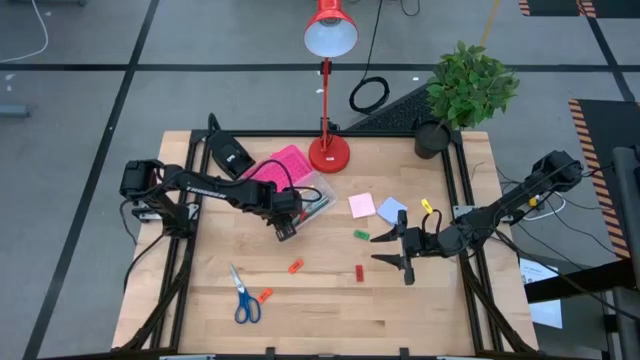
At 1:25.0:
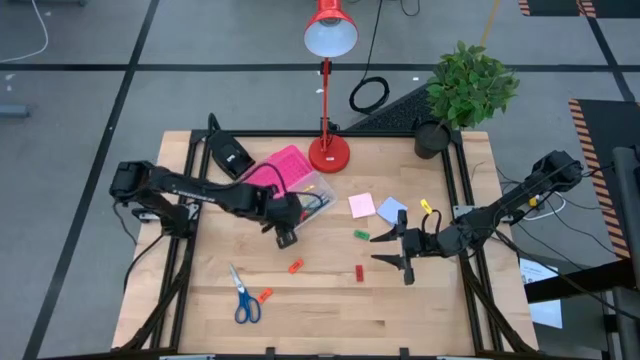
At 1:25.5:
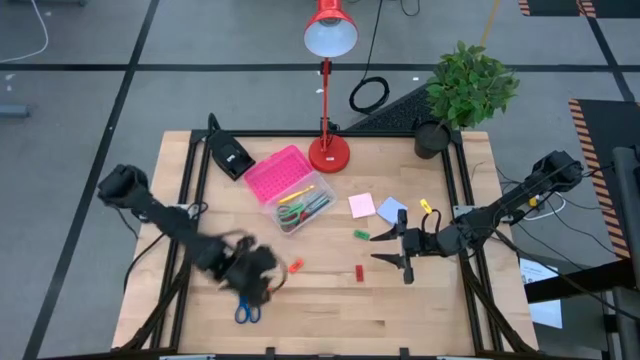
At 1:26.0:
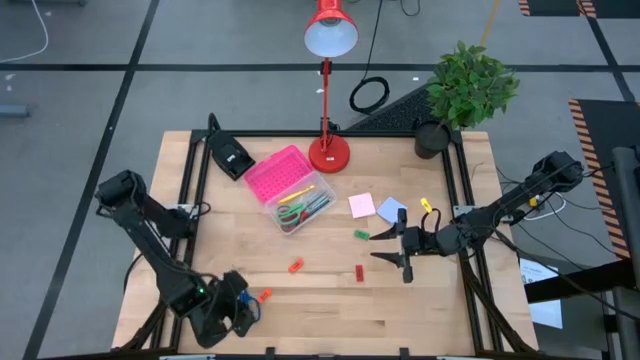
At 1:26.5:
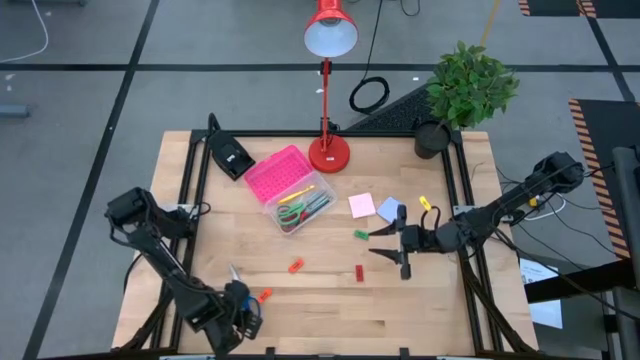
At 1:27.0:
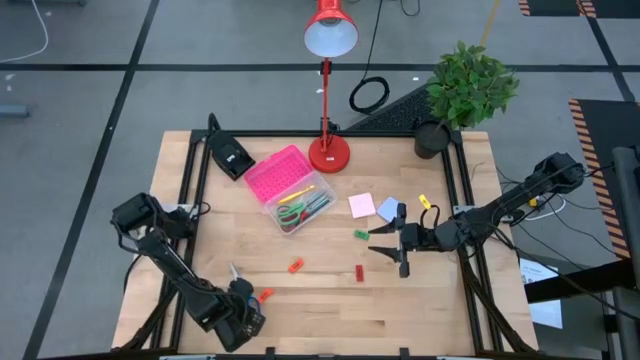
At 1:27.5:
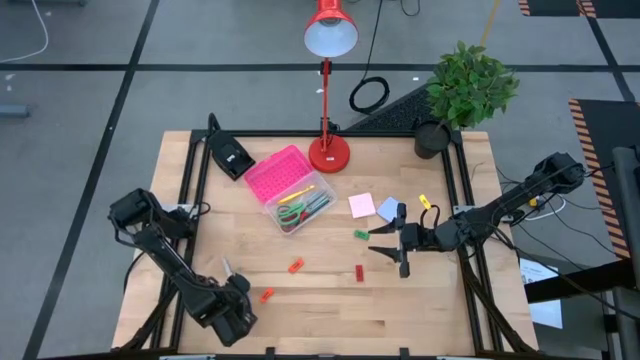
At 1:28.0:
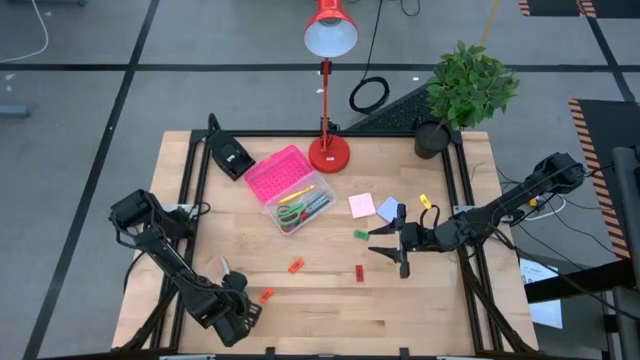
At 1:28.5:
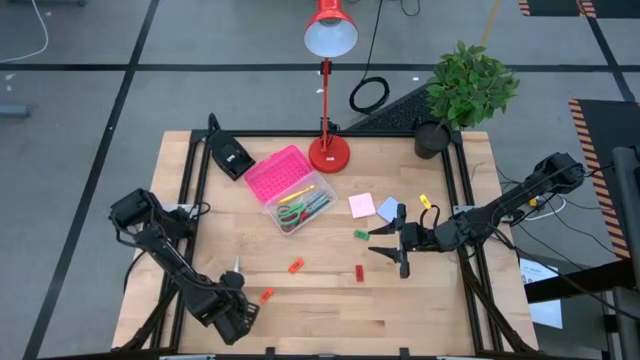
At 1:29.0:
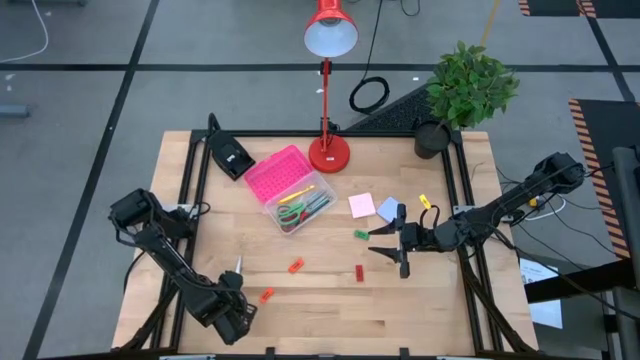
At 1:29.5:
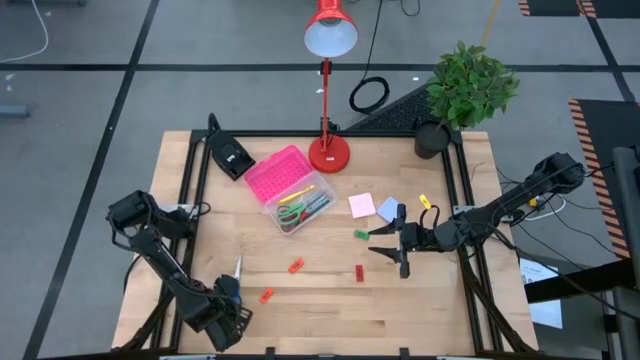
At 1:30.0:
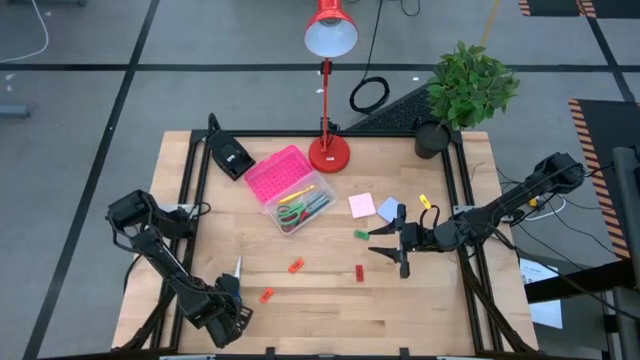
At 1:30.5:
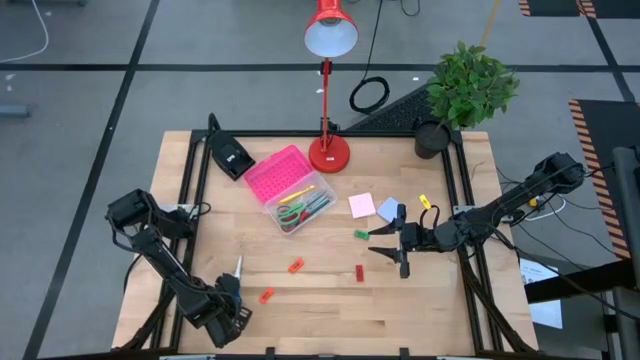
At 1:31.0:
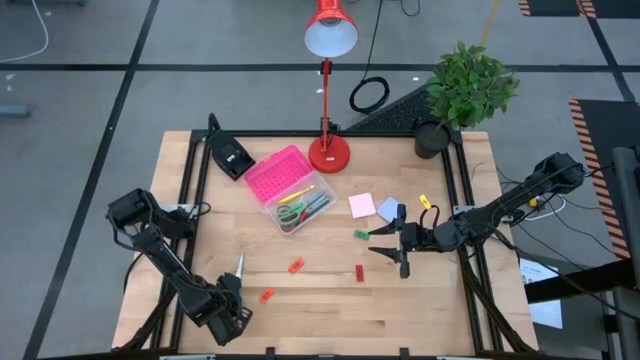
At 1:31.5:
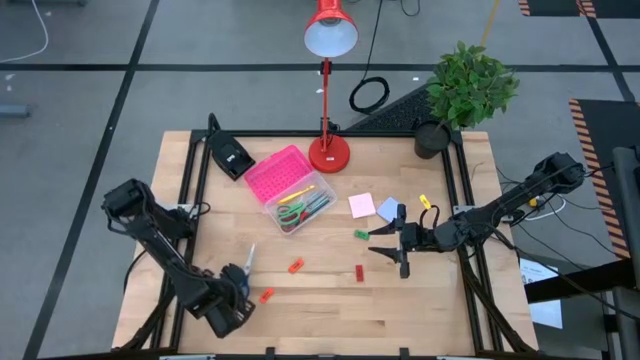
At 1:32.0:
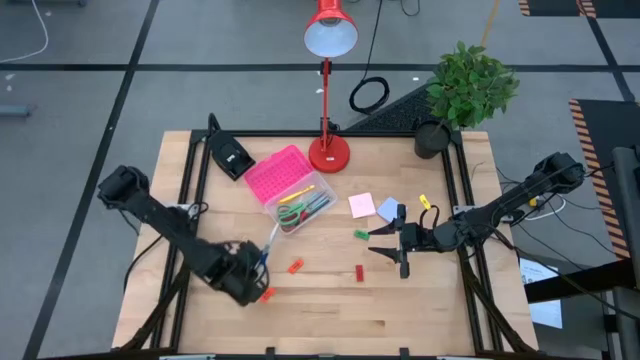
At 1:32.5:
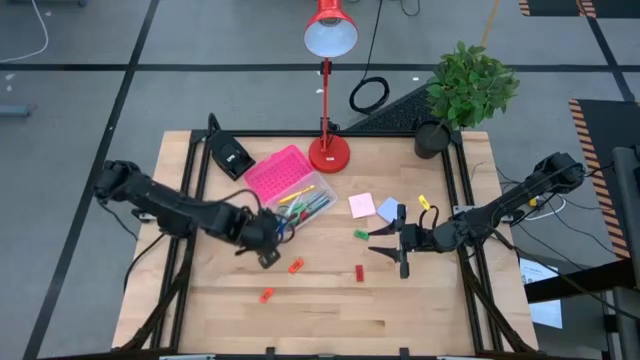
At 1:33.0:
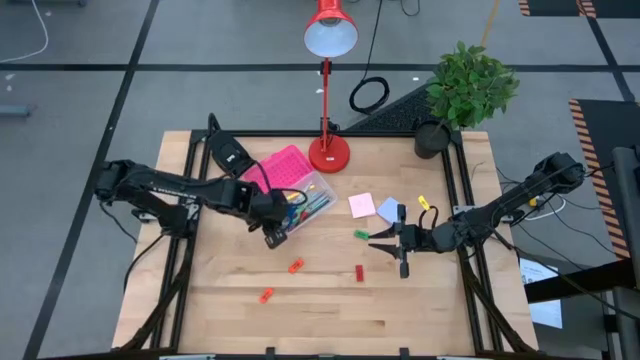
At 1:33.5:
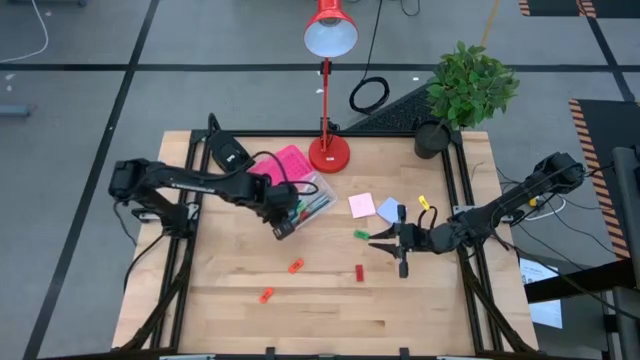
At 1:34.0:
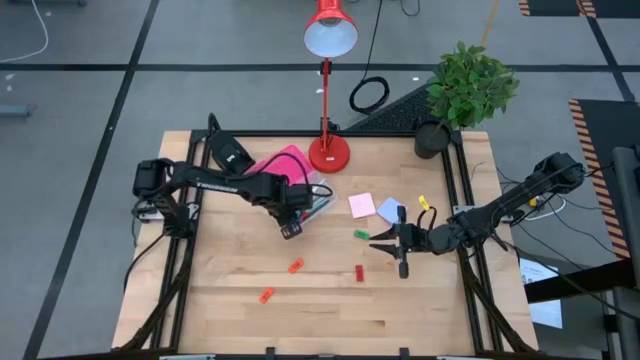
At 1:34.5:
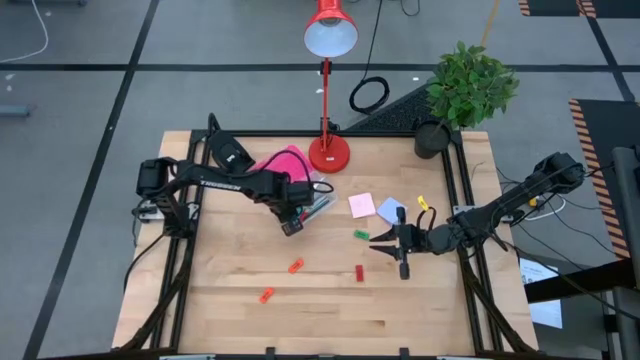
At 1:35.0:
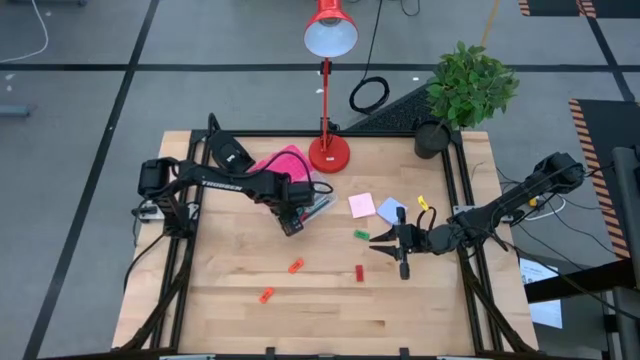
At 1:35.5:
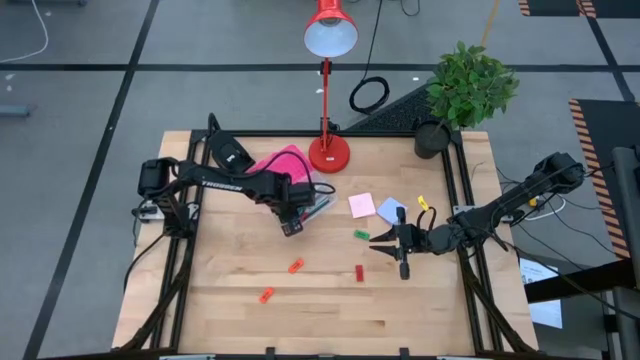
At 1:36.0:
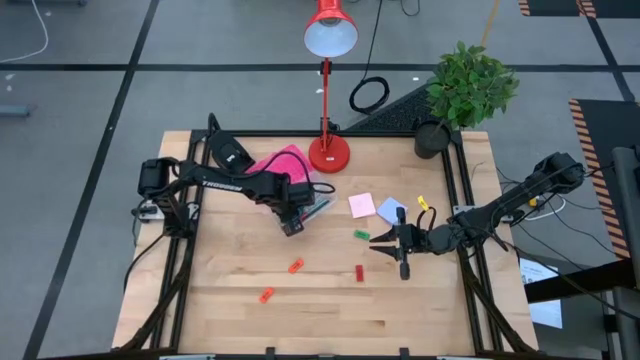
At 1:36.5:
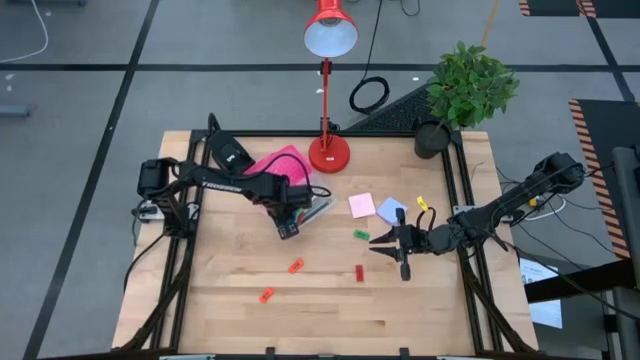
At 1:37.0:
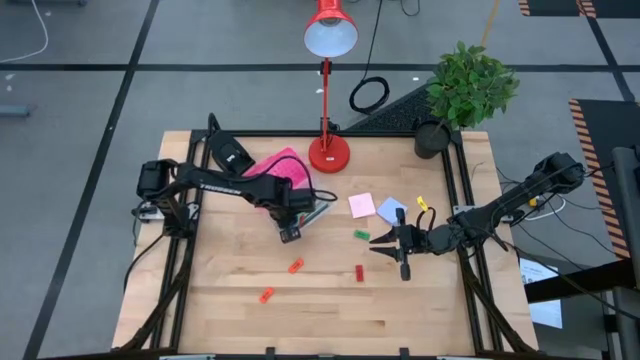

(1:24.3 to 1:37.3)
Task: Pack school essentials
Put the blue scissors into the pink supply box

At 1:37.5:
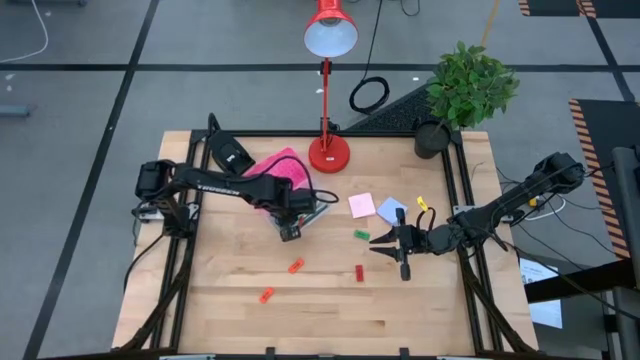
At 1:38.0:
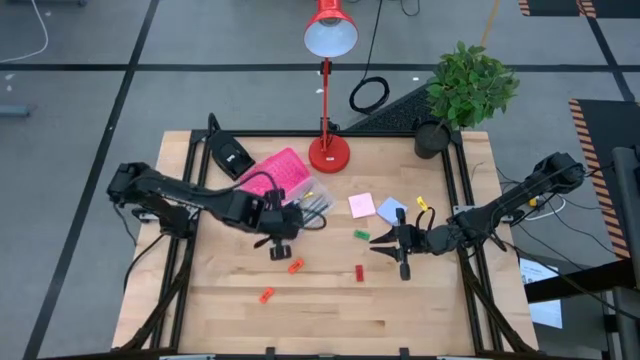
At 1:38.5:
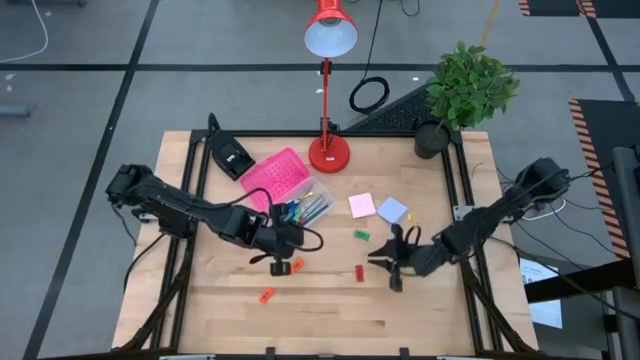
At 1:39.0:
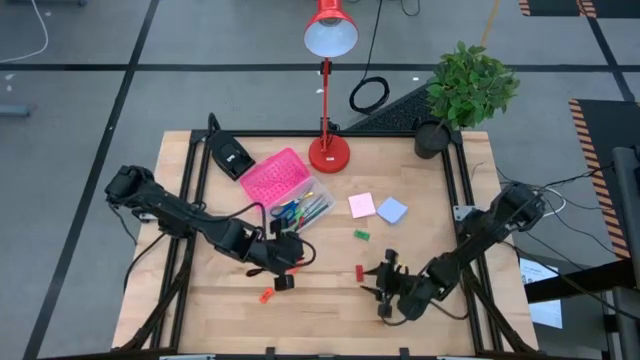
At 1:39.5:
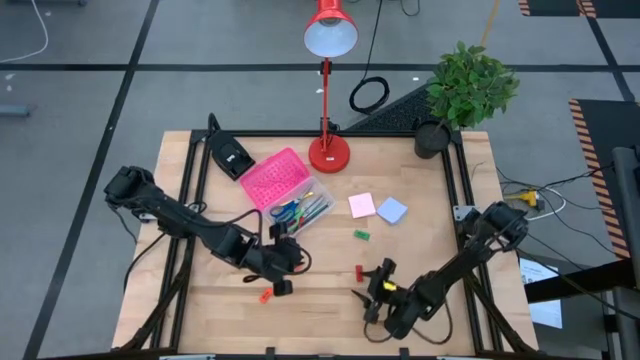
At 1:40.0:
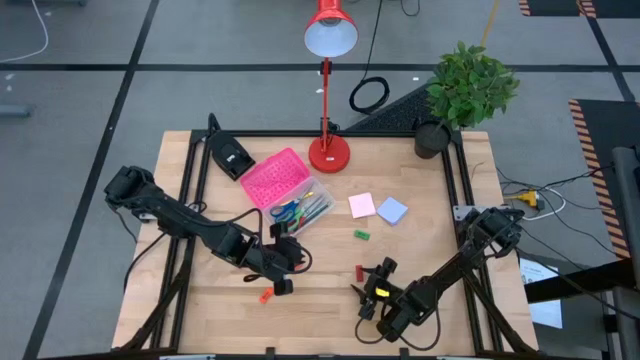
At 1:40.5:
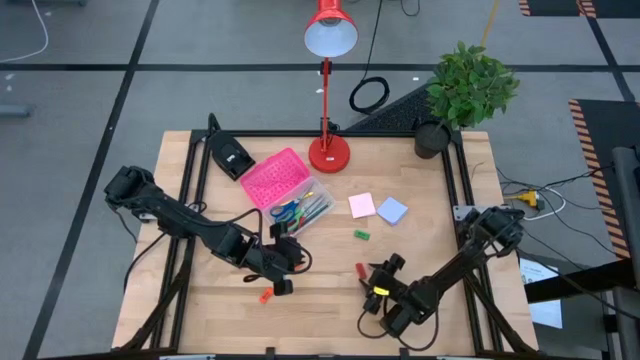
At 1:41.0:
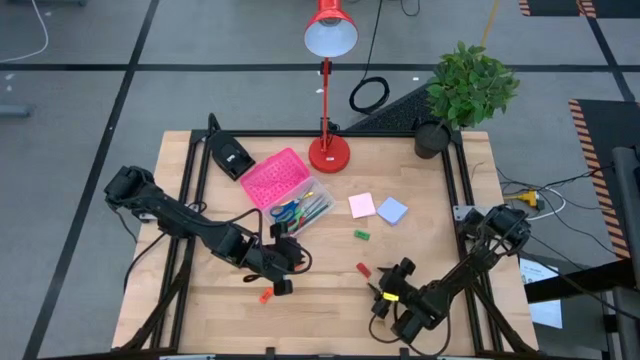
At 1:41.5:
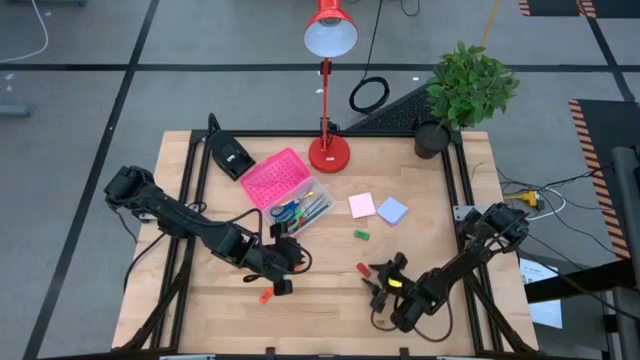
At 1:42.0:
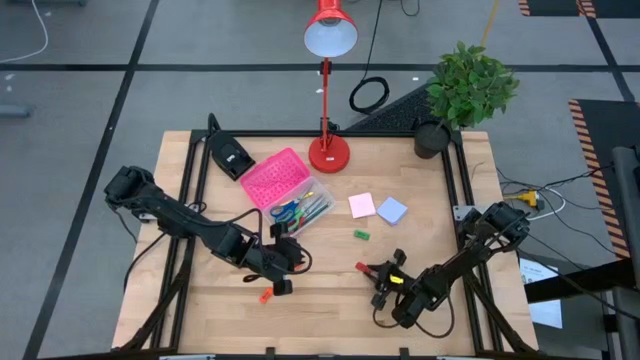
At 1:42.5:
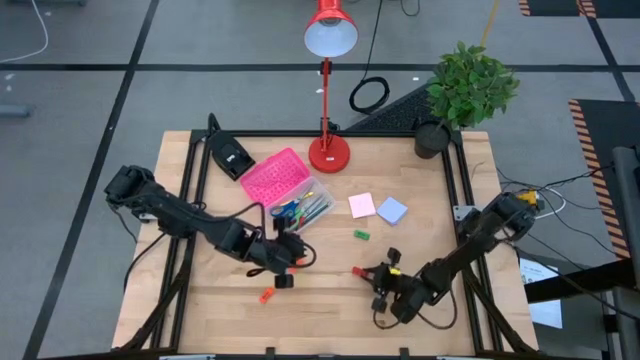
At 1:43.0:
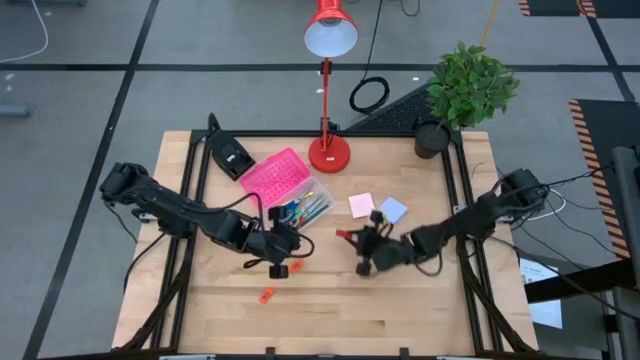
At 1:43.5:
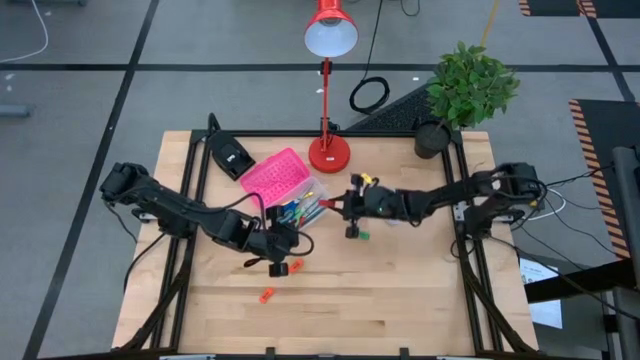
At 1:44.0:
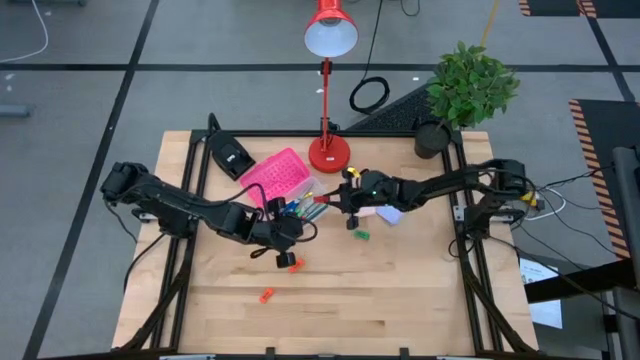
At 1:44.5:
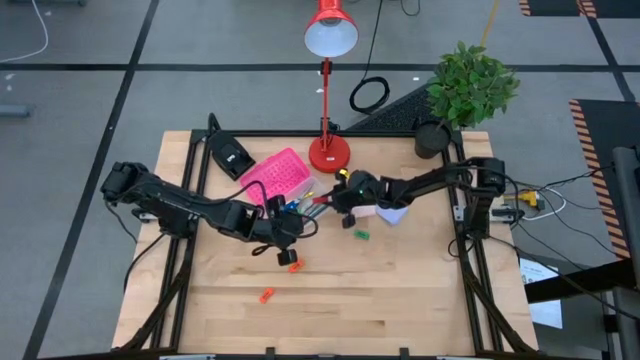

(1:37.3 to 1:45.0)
Put the red eraser into the pink supply box

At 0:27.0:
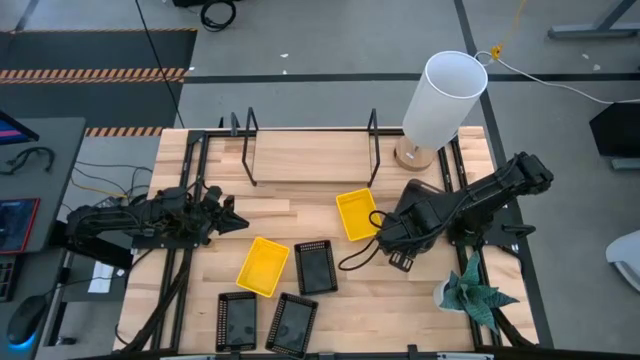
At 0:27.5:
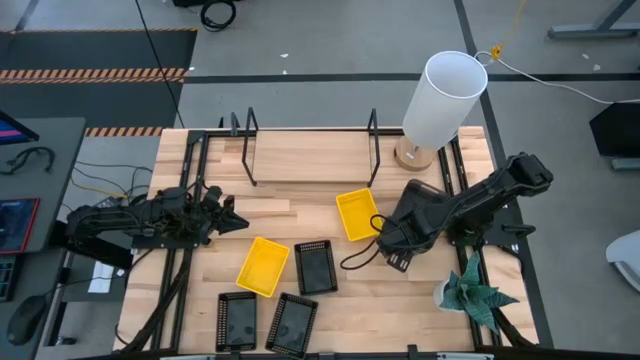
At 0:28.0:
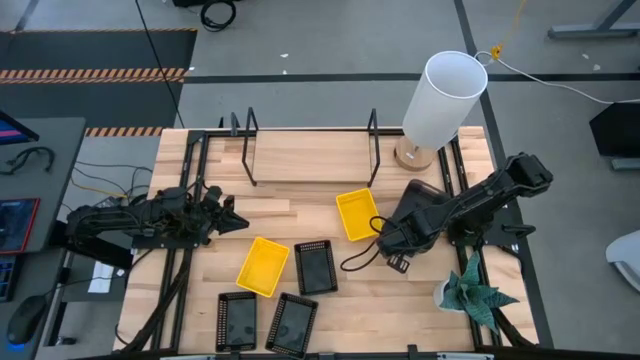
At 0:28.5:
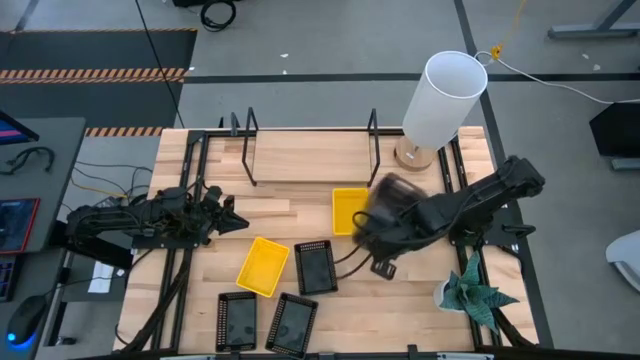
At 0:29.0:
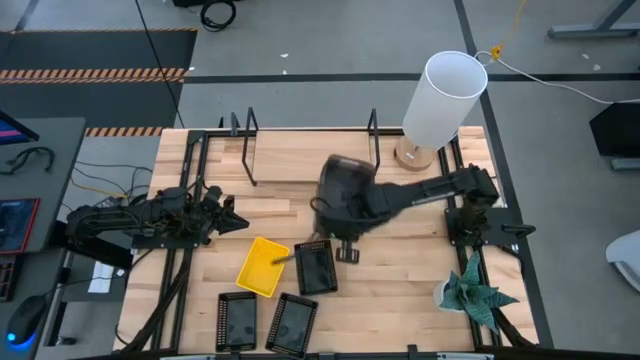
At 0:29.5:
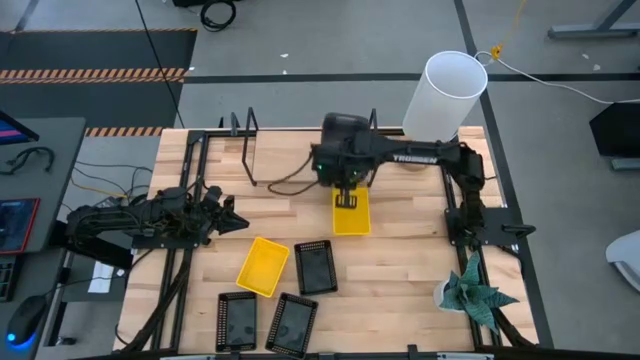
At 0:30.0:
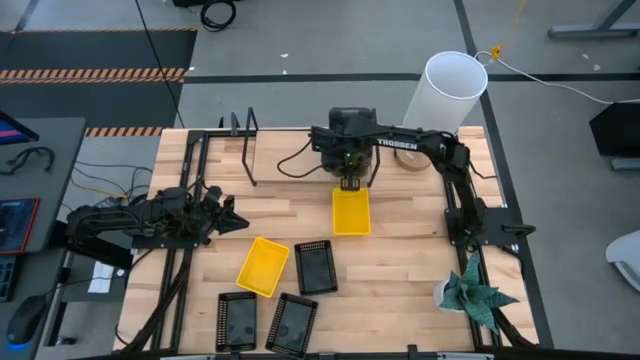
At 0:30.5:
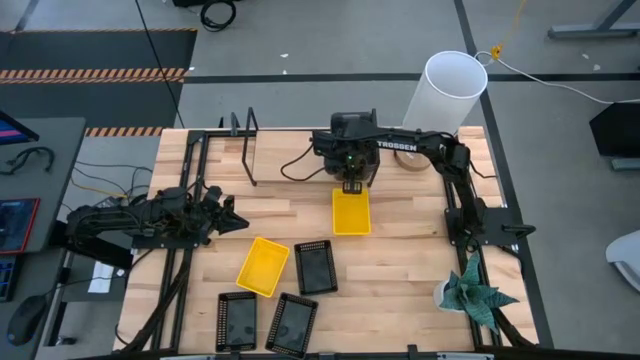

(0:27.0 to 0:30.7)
Task: Stack baskets on shelf by color
Put the stacked gray bins on the shelf
